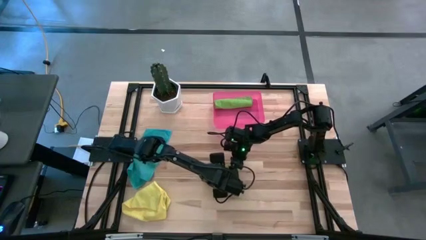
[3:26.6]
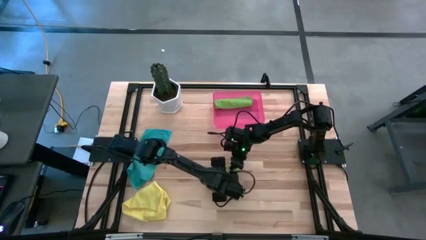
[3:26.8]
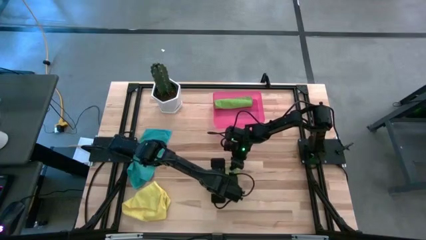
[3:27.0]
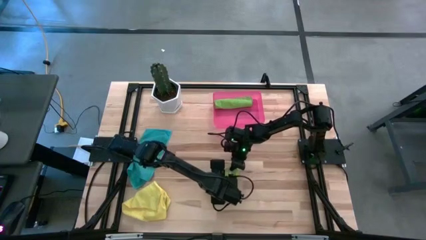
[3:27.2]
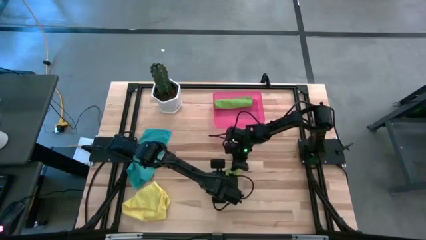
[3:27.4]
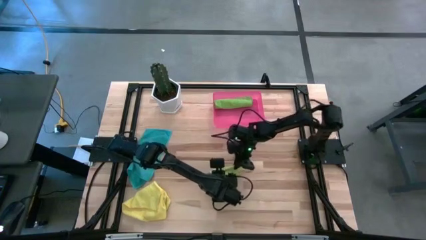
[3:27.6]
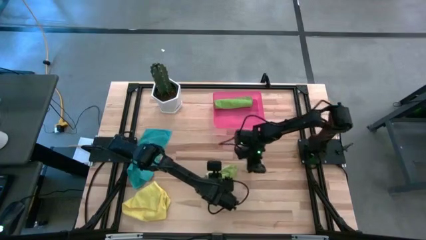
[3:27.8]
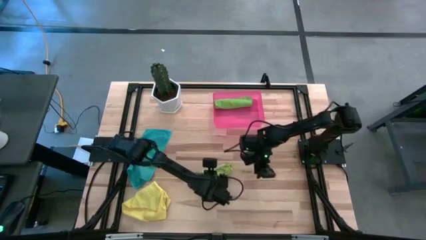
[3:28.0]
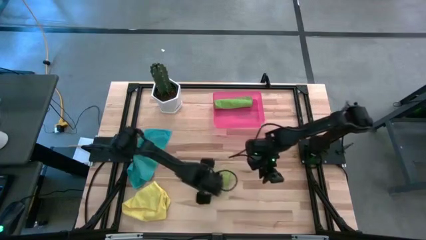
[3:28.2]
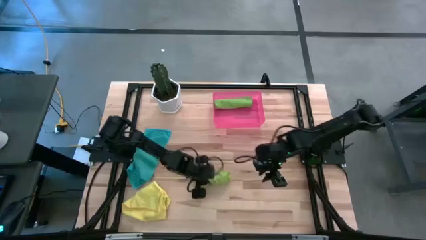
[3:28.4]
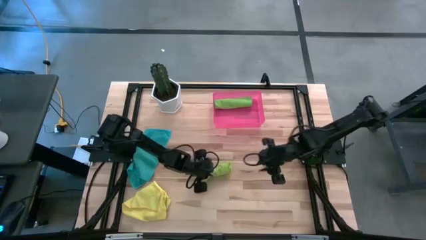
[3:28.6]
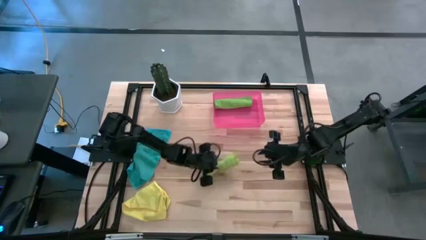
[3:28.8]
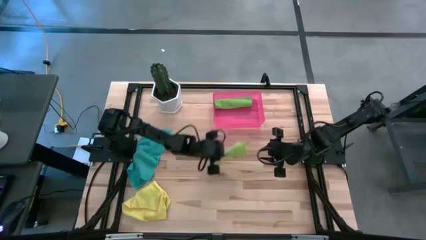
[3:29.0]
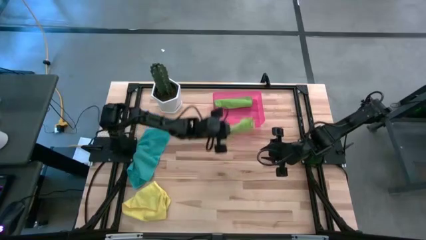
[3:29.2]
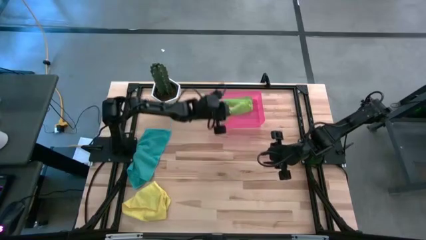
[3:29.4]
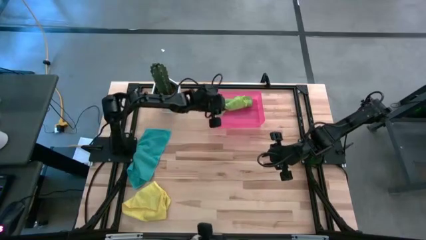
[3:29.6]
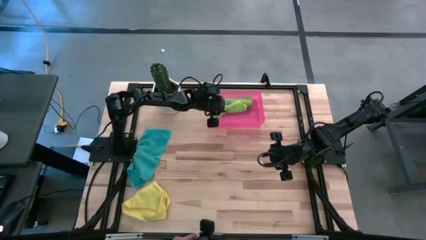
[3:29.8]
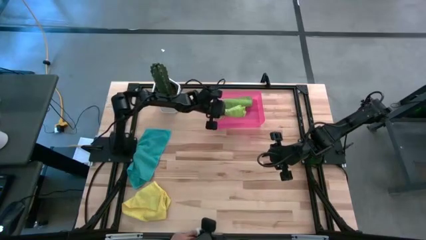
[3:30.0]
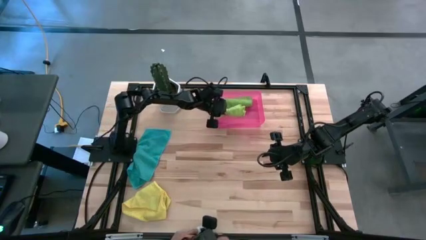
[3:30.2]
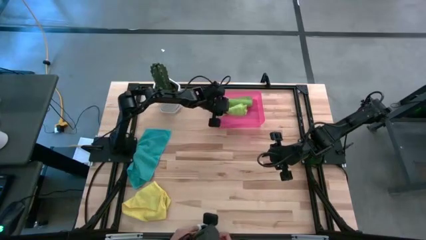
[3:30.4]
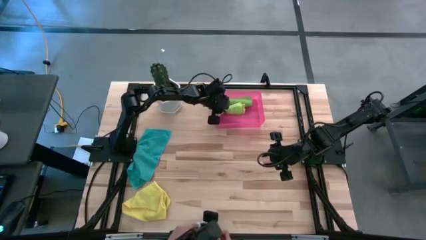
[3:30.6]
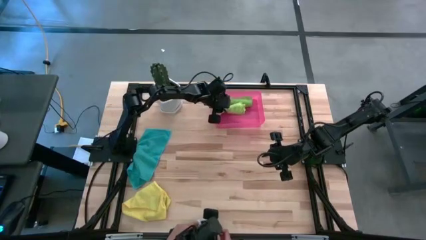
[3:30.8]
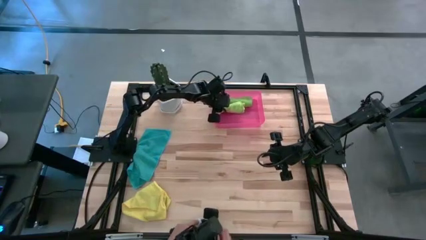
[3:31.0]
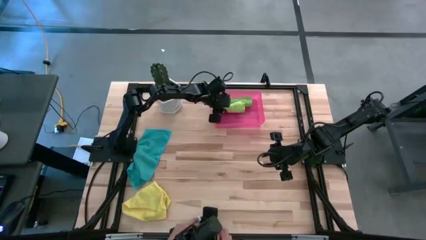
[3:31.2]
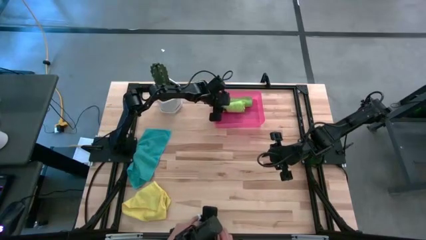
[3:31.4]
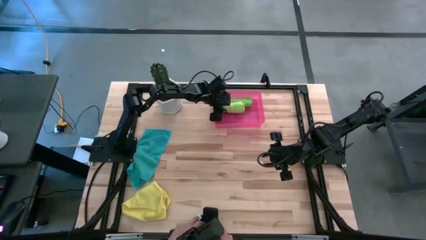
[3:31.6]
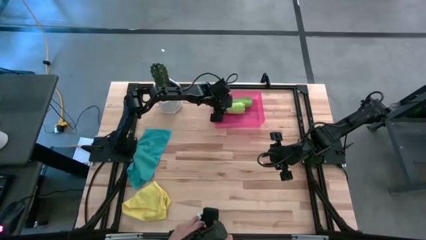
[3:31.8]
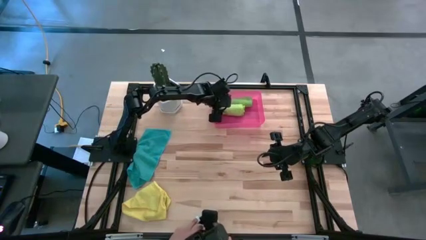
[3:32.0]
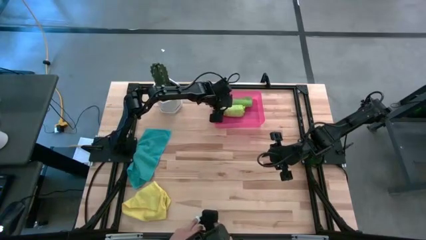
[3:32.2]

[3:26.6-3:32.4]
Task: Roll microfiber towels into tight, uniform cylinder then place into a basket
Put the light green microfiber cloth into the pink bin

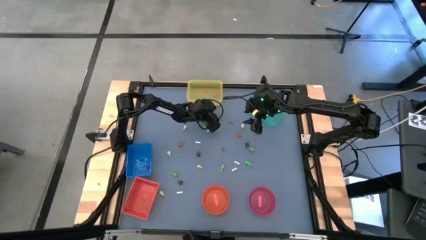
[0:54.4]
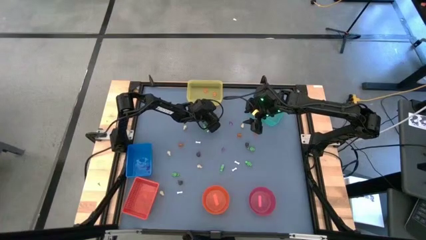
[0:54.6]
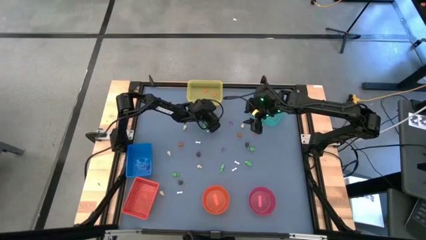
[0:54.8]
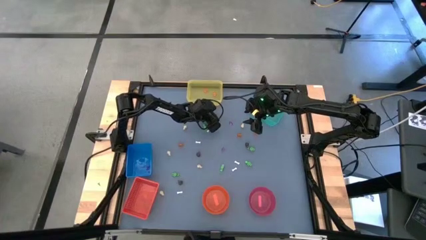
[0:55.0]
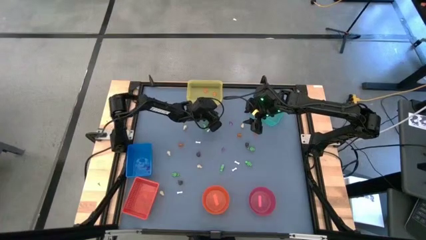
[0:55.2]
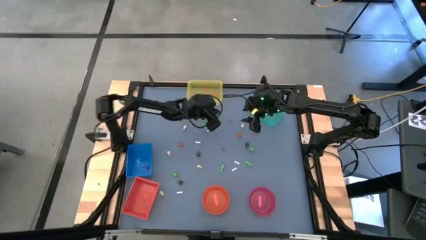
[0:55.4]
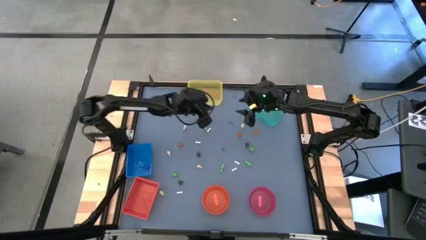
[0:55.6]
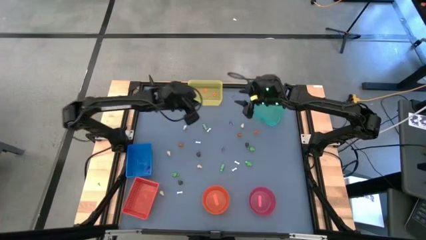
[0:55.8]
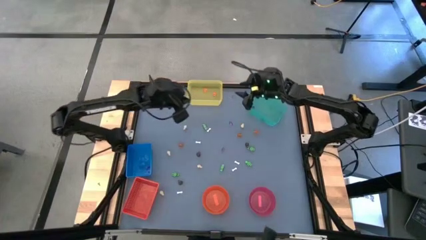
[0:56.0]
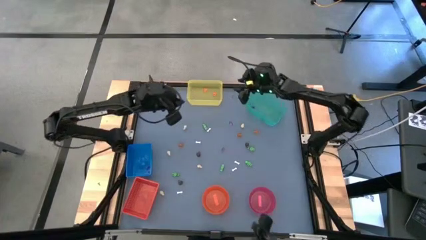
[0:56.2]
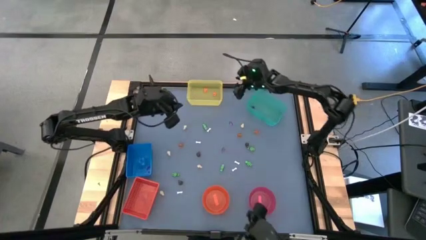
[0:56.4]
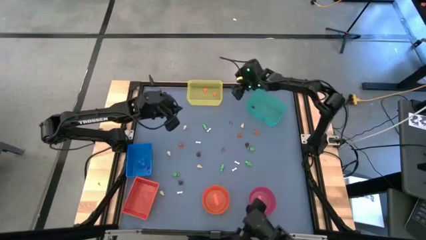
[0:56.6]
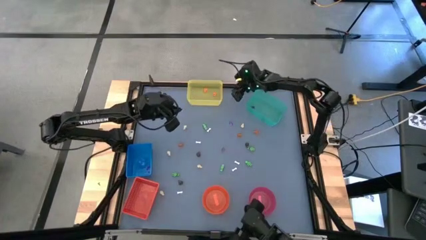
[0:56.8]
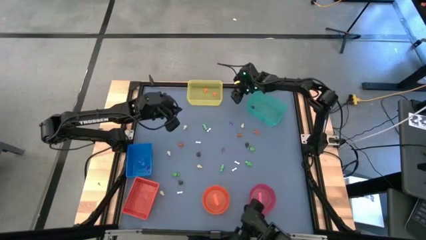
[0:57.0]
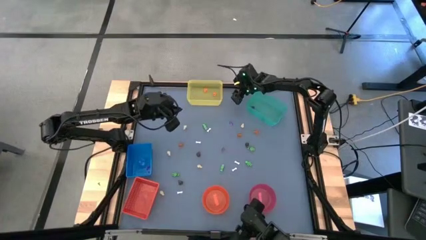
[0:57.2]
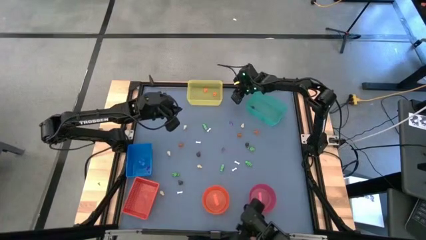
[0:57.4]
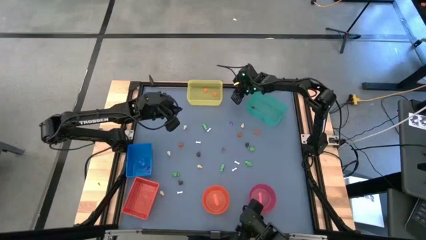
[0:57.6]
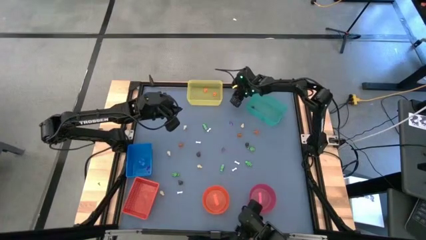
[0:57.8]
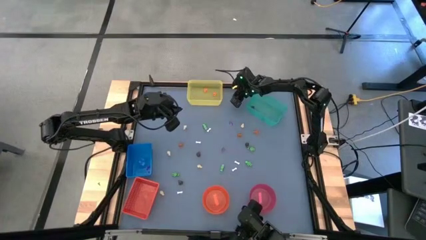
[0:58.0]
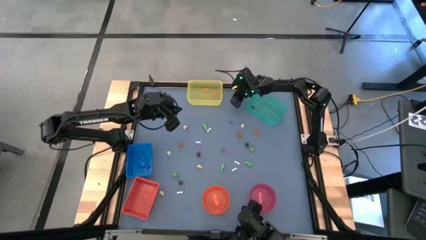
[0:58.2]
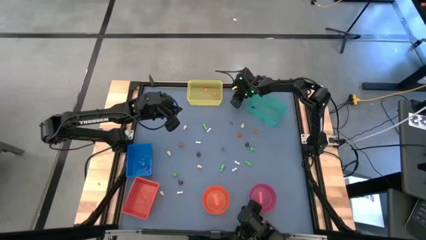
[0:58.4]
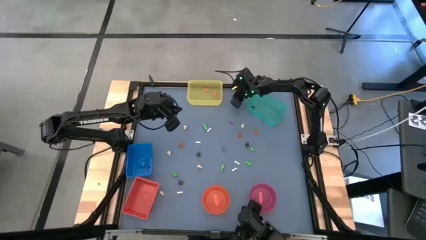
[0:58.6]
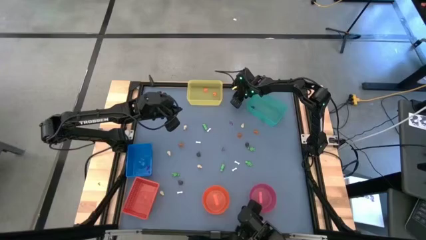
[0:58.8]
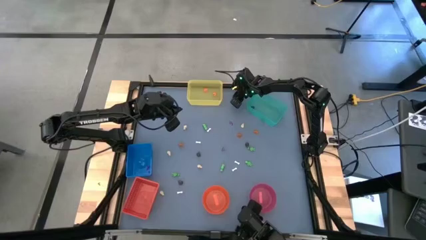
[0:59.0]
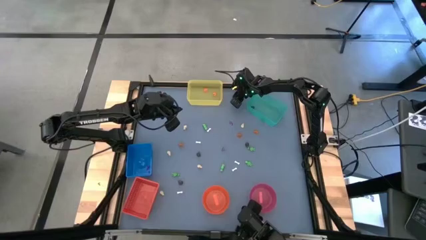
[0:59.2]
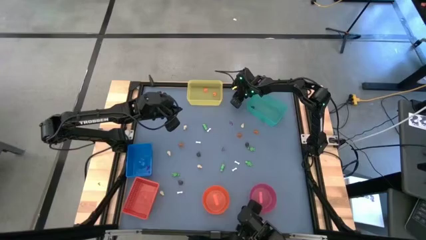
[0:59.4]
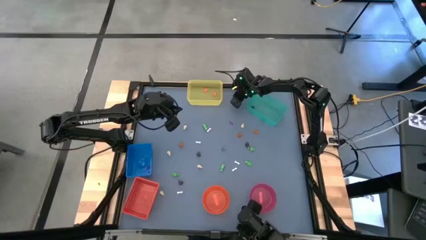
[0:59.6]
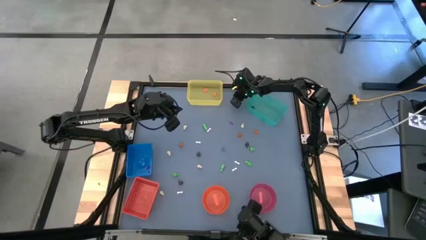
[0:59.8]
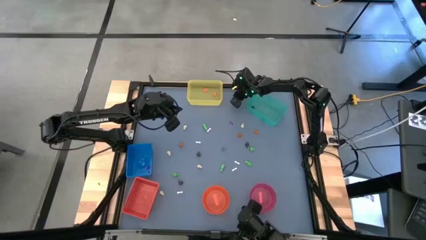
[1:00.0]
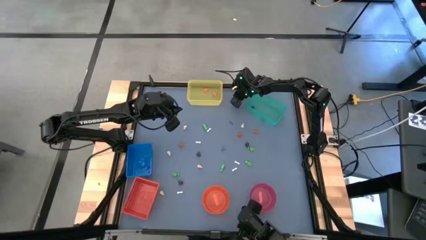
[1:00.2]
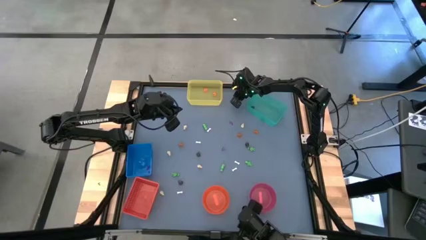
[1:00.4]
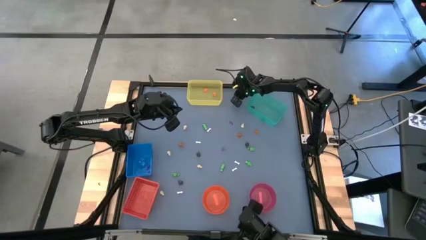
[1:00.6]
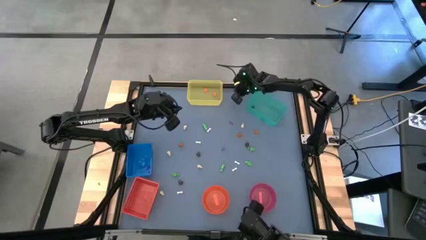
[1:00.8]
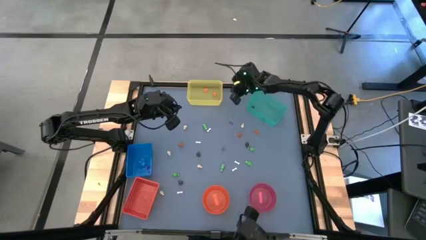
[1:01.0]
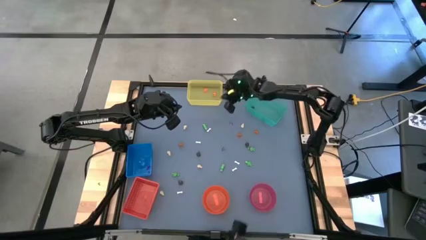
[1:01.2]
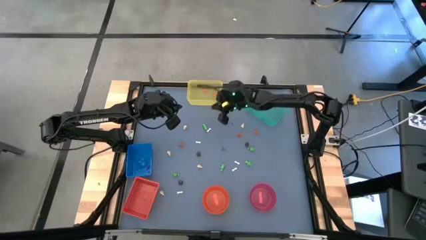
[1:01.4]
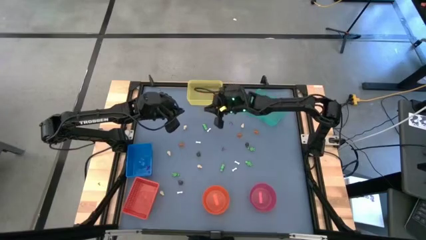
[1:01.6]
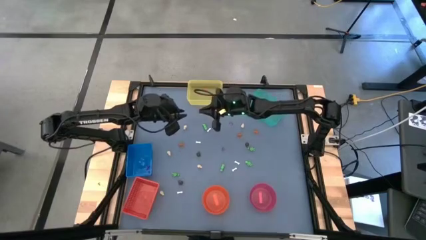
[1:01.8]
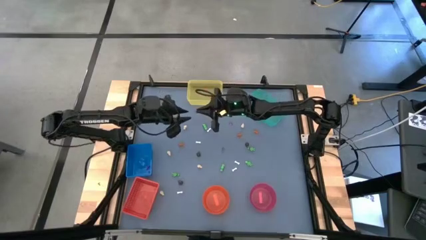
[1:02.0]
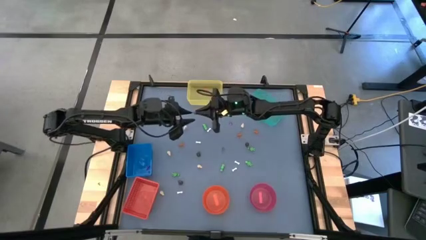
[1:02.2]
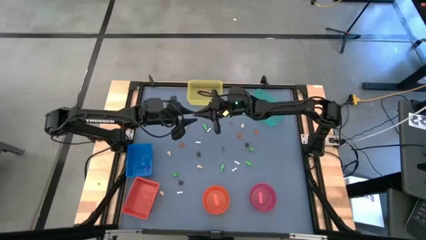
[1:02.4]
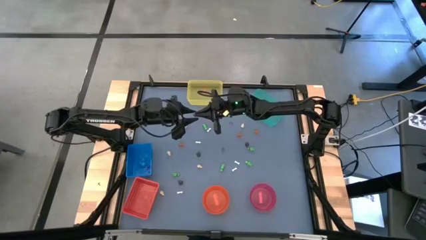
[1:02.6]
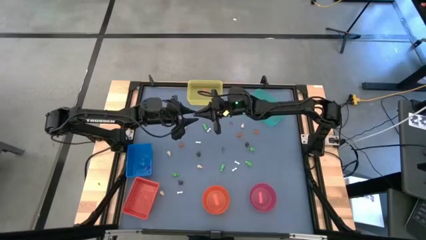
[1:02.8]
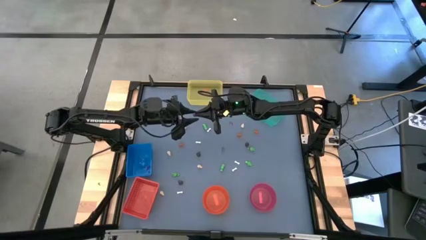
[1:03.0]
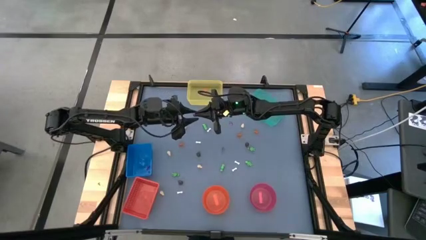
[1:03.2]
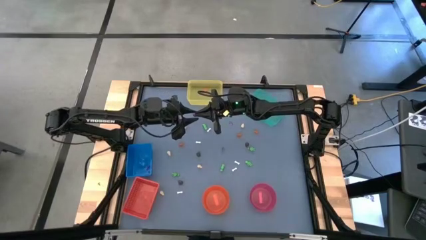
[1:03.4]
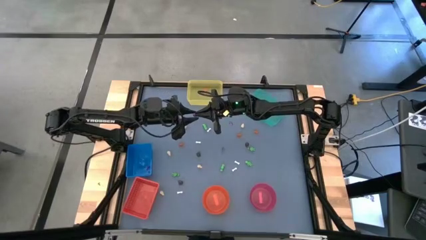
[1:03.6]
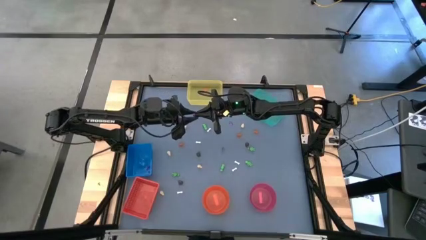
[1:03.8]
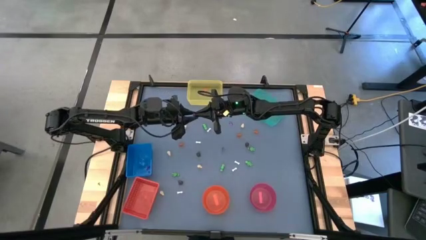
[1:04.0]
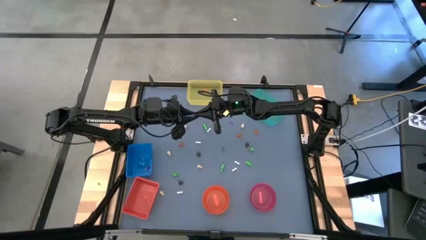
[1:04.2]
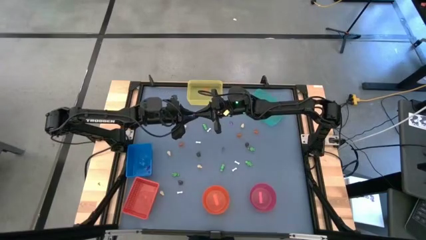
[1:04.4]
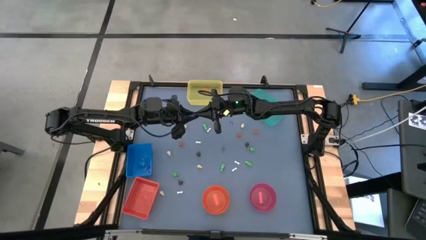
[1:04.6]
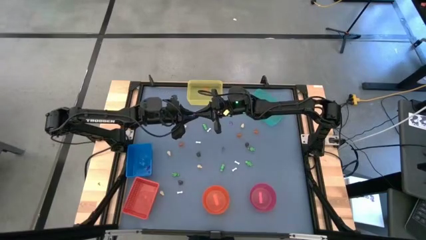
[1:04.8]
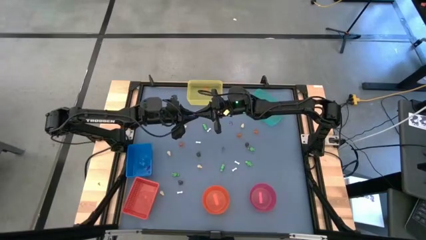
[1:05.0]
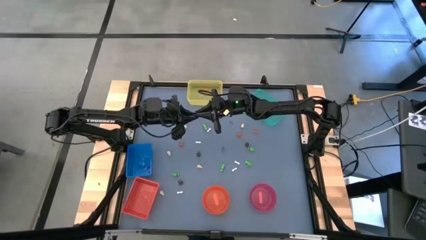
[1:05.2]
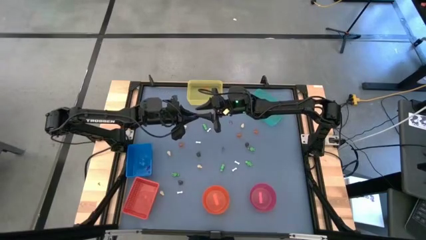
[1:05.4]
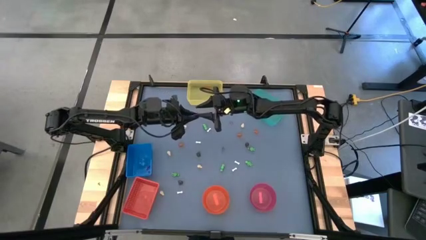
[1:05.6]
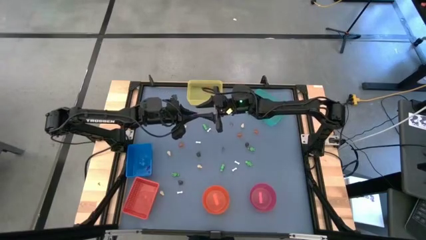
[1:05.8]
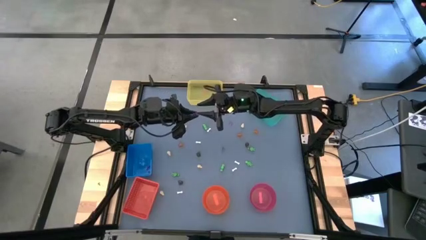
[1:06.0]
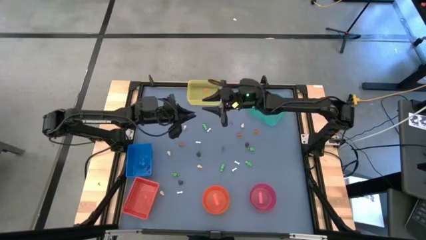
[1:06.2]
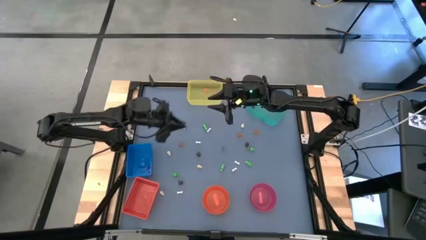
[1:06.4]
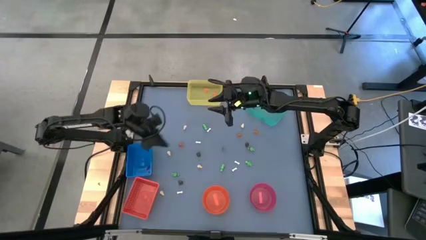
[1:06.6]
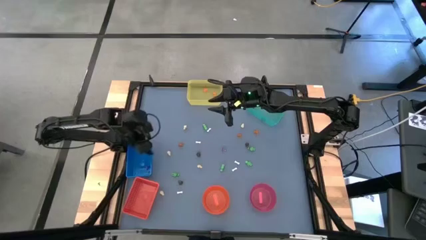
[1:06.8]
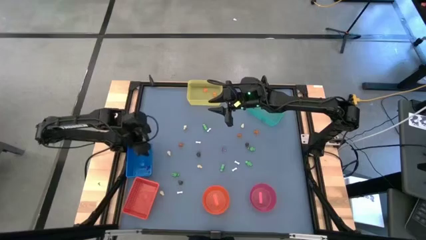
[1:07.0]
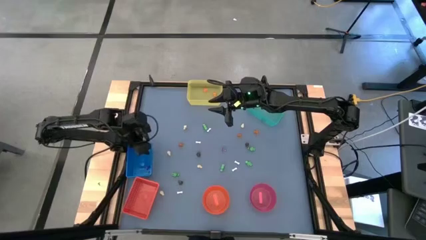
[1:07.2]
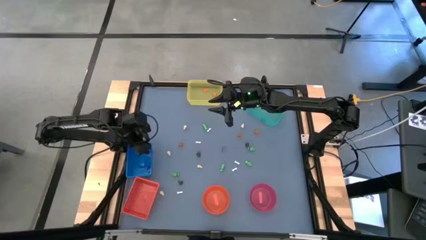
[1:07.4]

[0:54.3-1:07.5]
Task: Sort Halloween decoration
Put the purple witch hat toy into the blue bin
